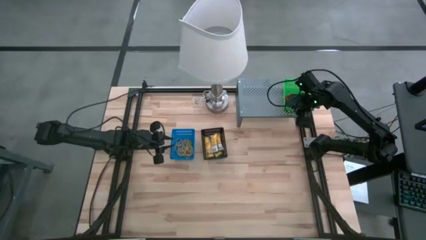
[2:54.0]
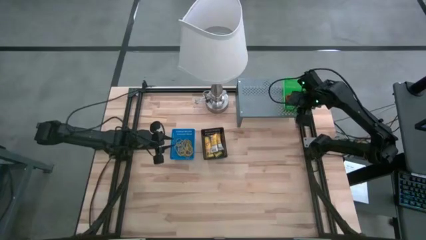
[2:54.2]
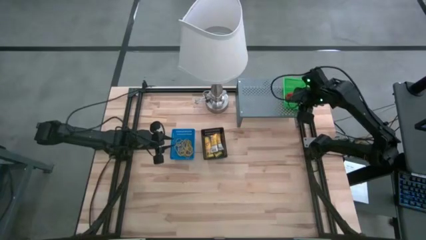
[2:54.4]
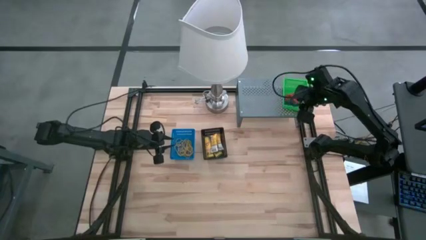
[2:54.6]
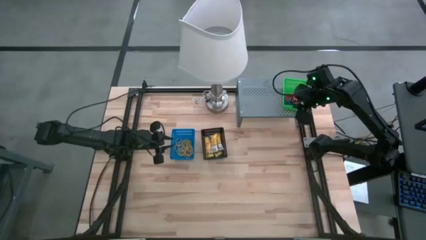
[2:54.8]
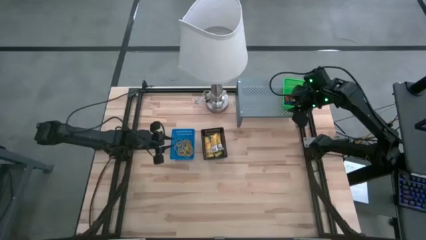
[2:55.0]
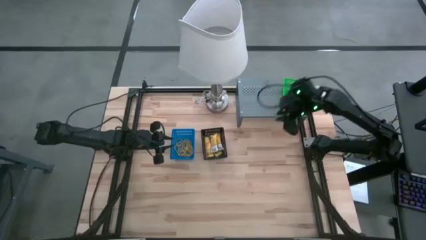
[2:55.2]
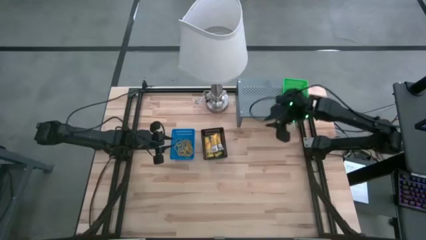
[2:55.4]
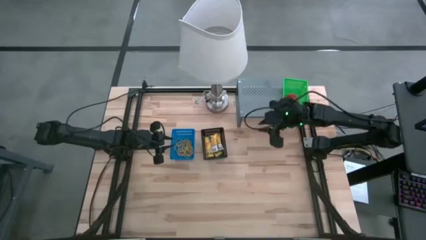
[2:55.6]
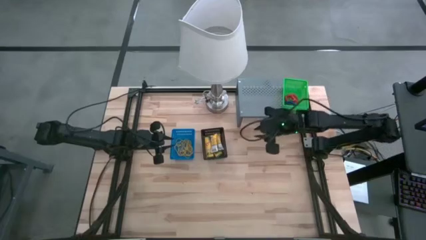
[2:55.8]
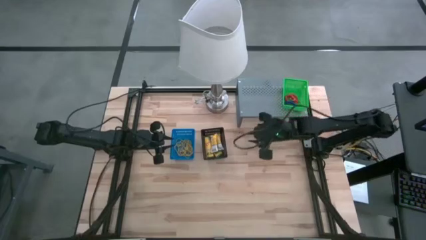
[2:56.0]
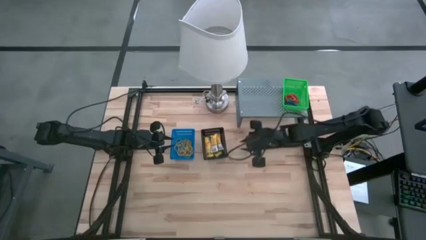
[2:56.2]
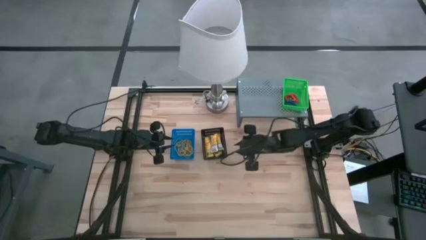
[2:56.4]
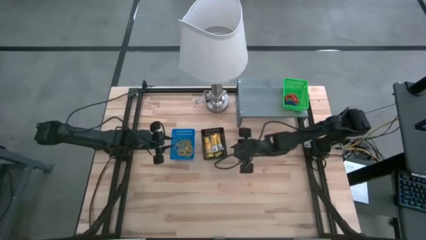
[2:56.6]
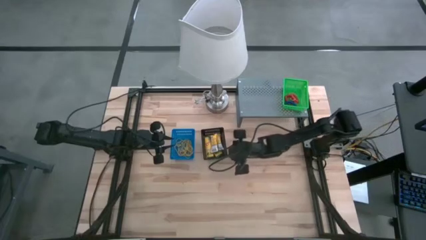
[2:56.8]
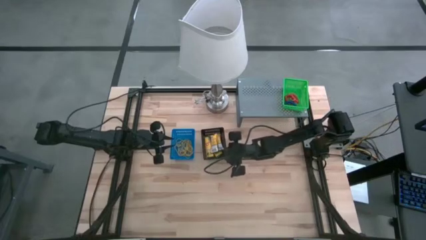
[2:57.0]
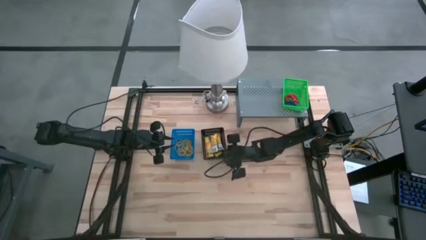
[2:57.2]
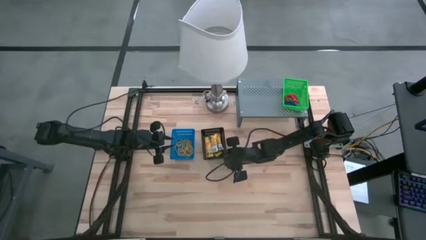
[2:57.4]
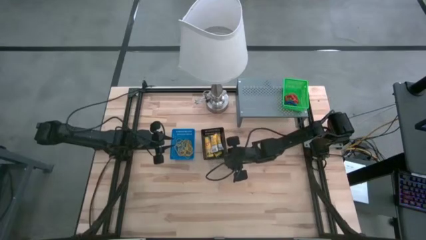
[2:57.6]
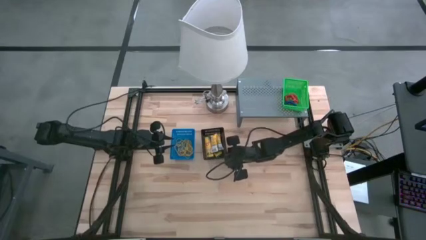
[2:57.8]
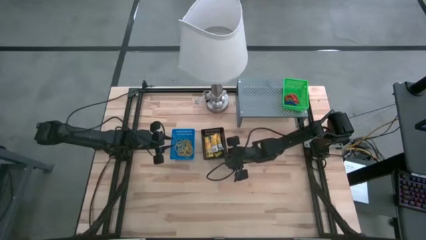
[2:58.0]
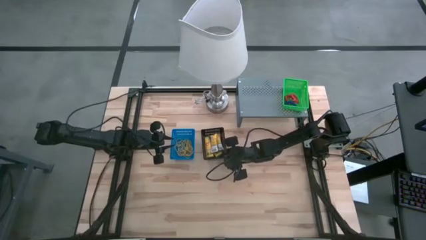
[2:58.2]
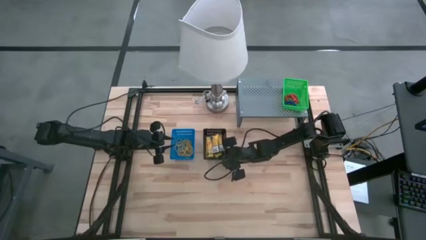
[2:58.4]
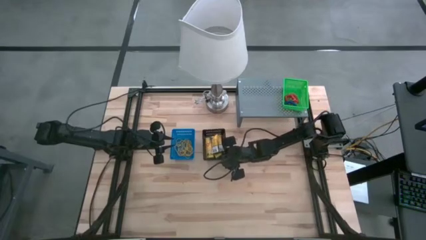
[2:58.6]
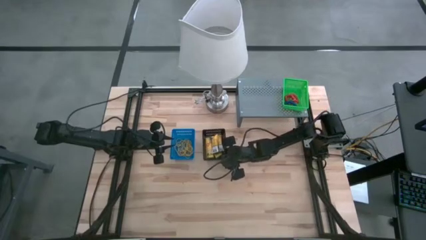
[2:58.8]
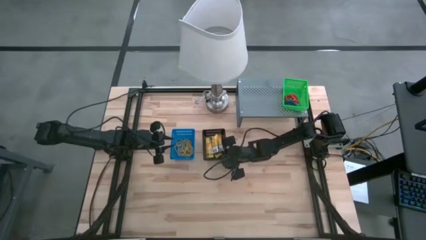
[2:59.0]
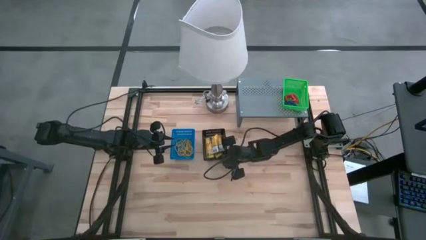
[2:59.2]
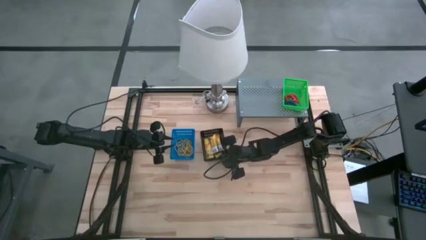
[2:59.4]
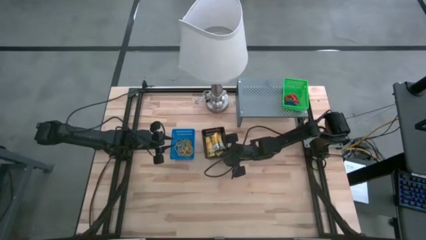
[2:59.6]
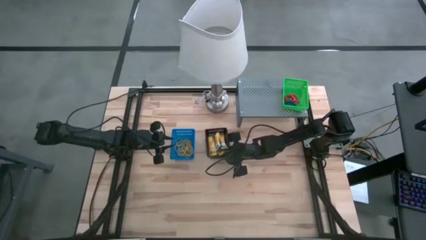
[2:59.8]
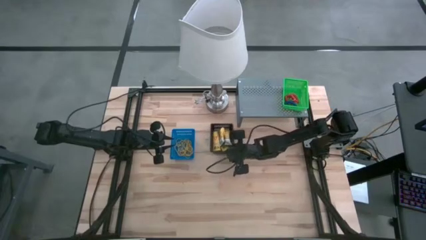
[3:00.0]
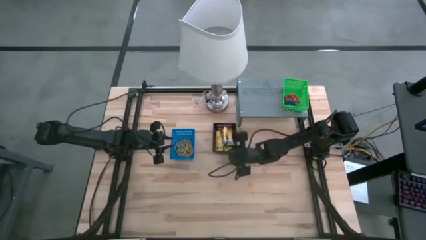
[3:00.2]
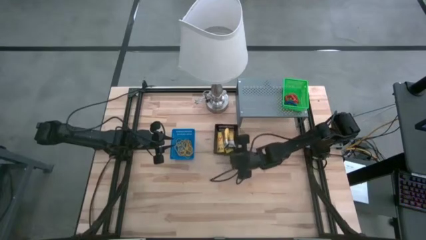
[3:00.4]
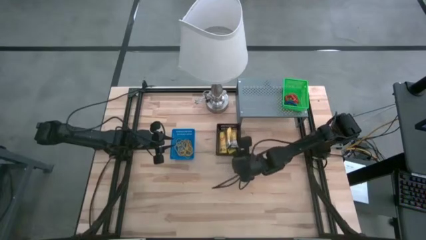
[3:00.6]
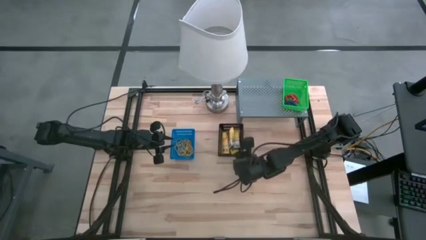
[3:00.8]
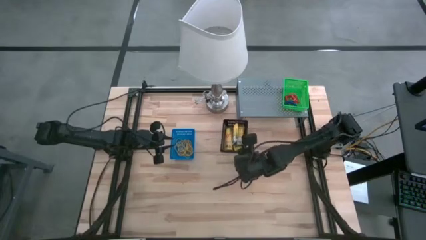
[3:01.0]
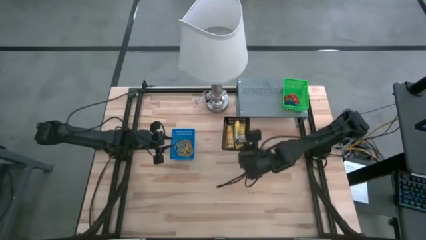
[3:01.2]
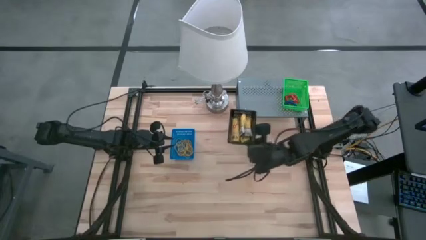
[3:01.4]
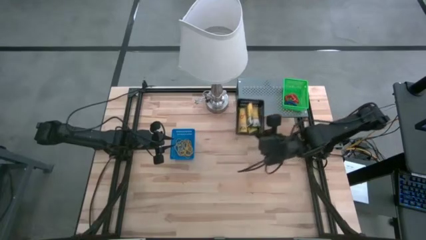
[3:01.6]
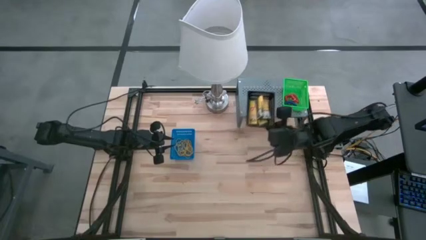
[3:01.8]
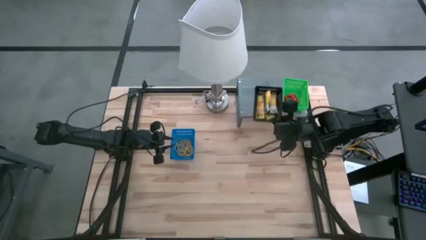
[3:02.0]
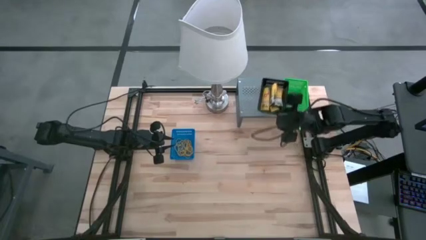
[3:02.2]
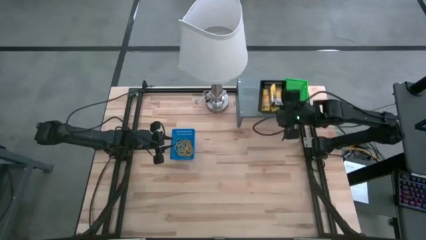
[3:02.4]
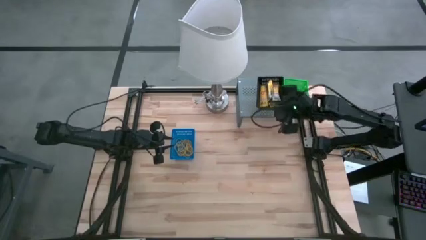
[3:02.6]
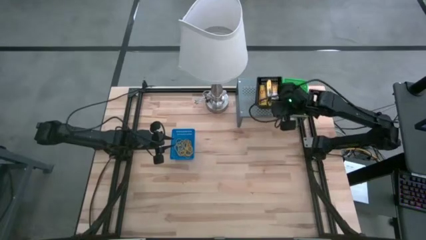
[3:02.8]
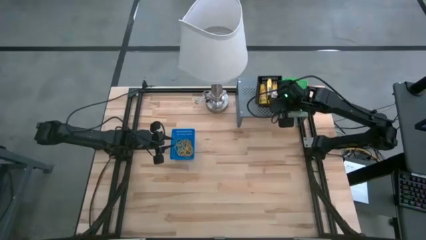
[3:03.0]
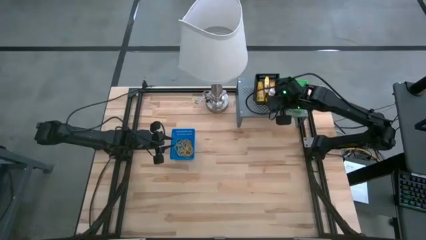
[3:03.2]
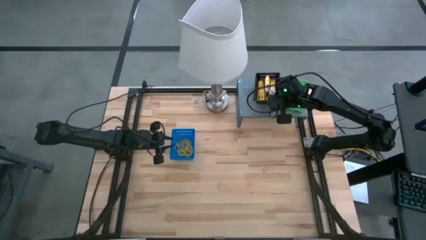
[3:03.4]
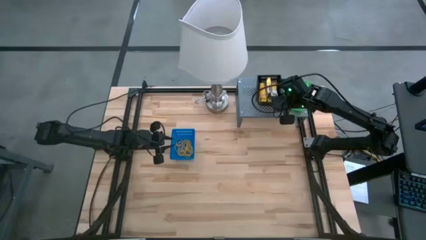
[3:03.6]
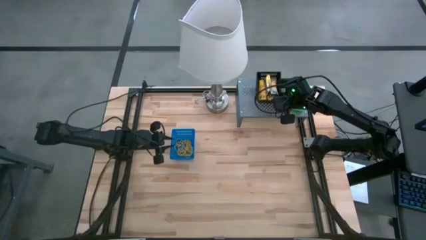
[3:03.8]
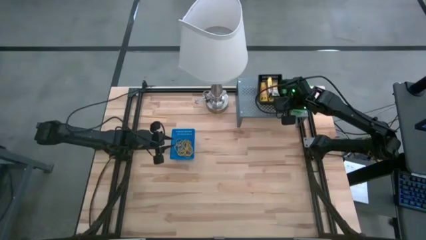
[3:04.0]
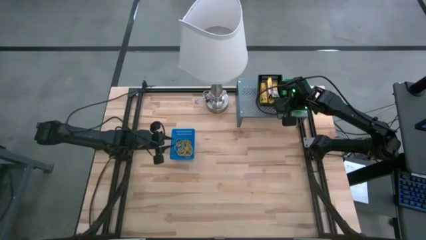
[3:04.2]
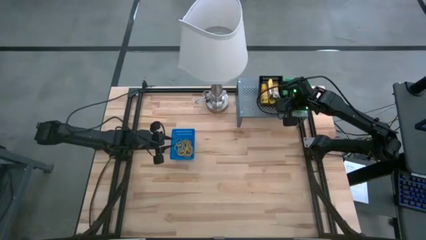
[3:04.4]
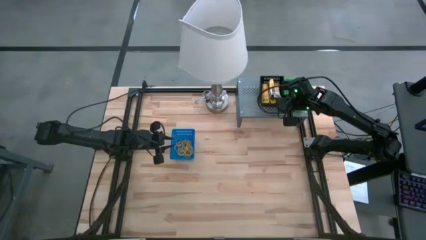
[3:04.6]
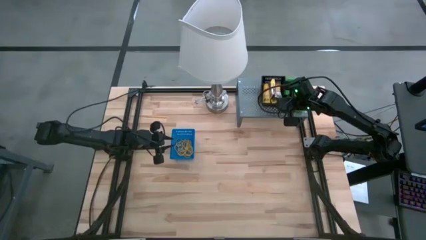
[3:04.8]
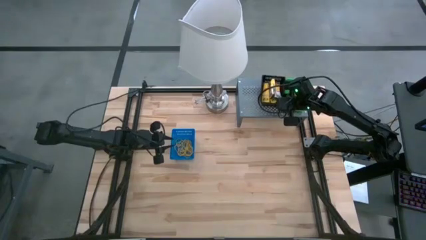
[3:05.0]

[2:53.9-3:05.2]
Task: Pick & Place Office Desk Supplies
Put the black bin on the shelf

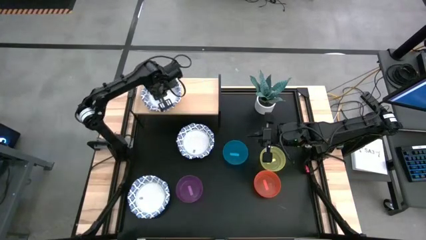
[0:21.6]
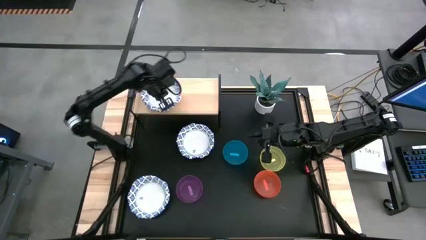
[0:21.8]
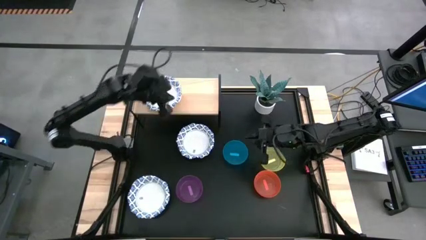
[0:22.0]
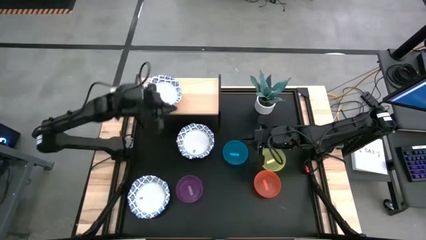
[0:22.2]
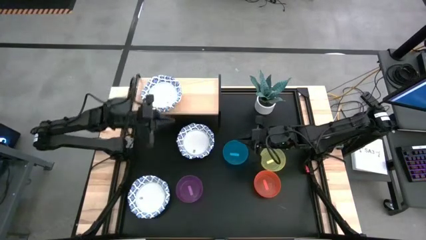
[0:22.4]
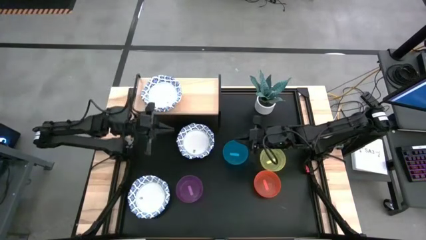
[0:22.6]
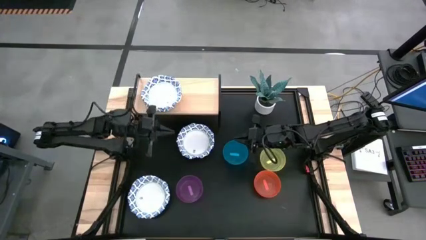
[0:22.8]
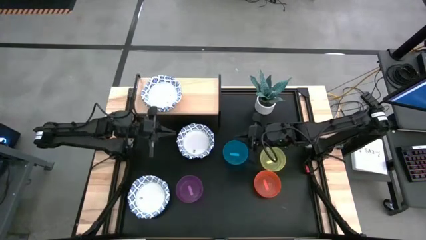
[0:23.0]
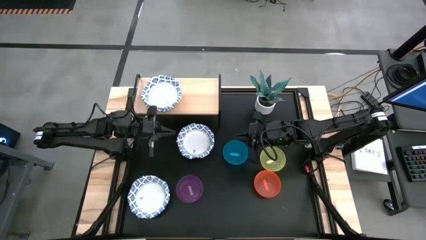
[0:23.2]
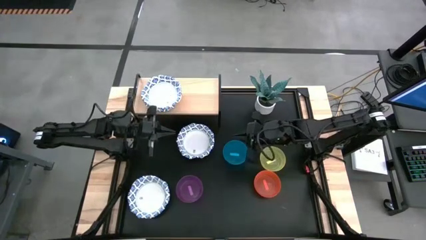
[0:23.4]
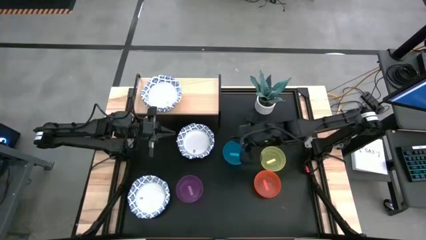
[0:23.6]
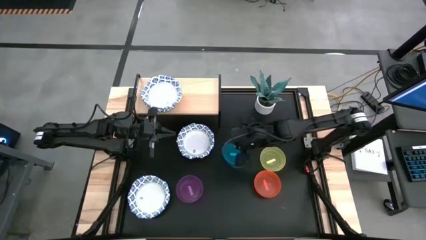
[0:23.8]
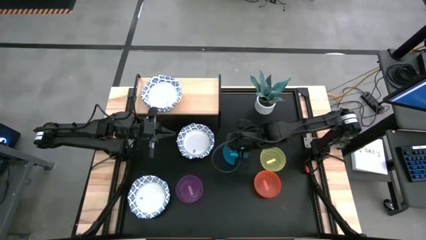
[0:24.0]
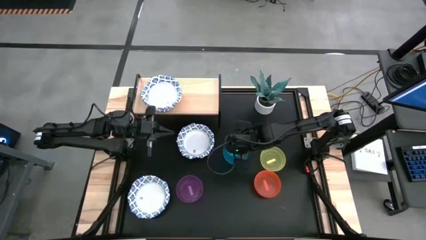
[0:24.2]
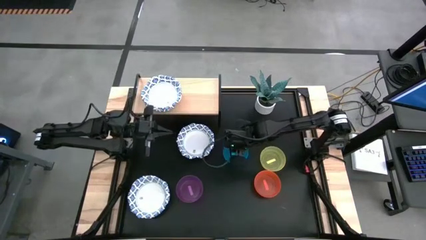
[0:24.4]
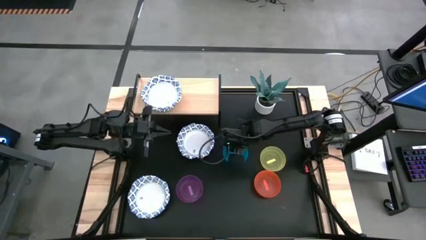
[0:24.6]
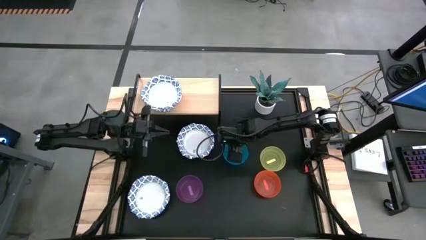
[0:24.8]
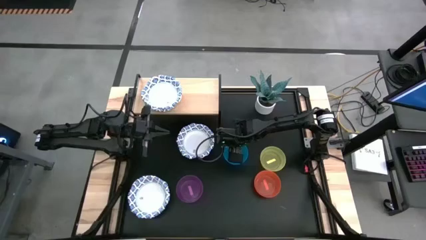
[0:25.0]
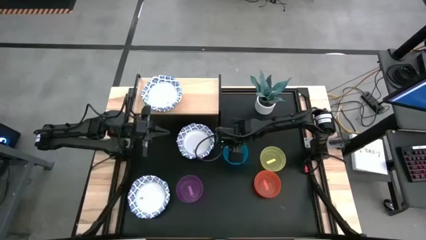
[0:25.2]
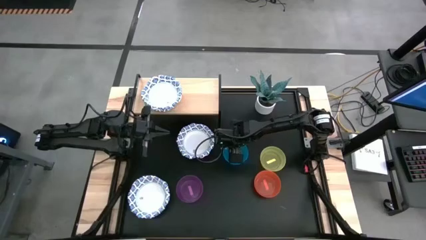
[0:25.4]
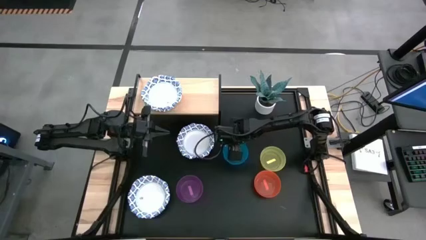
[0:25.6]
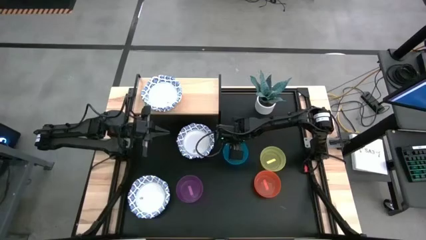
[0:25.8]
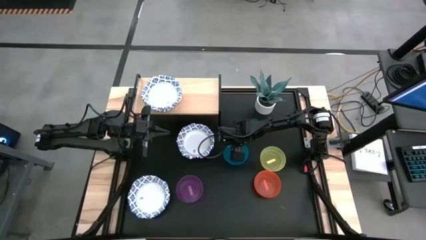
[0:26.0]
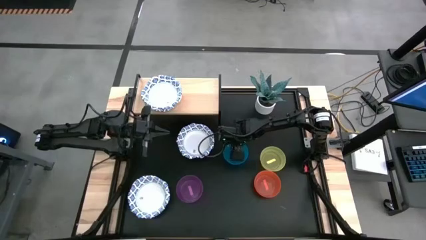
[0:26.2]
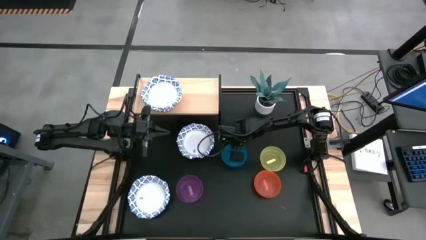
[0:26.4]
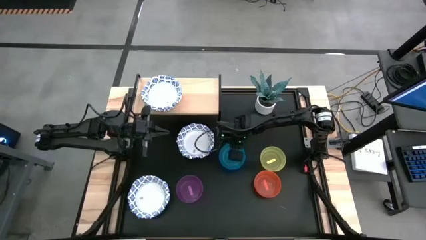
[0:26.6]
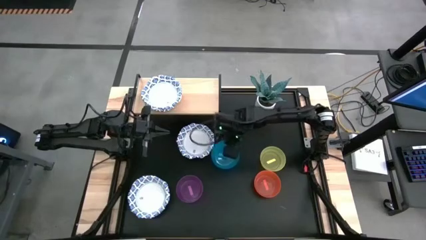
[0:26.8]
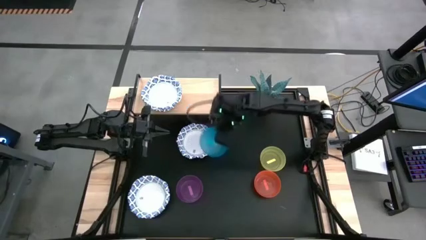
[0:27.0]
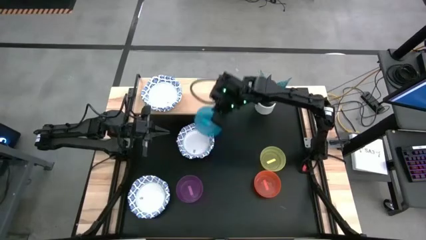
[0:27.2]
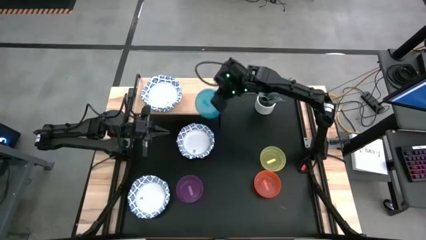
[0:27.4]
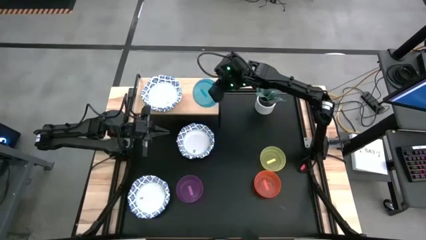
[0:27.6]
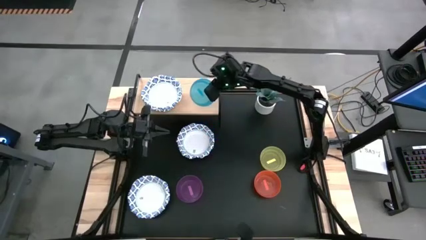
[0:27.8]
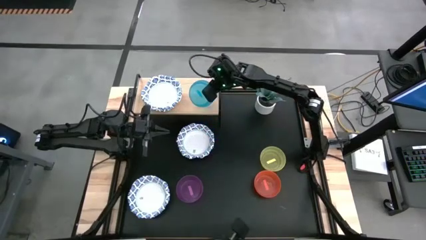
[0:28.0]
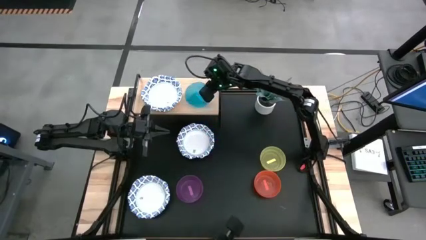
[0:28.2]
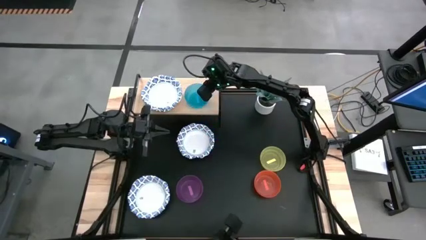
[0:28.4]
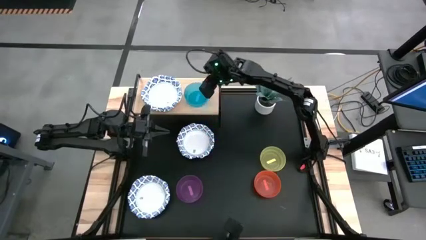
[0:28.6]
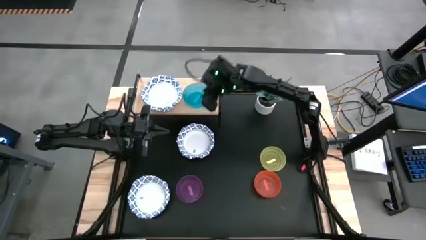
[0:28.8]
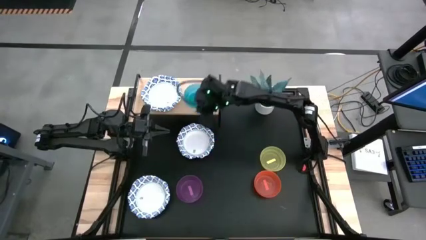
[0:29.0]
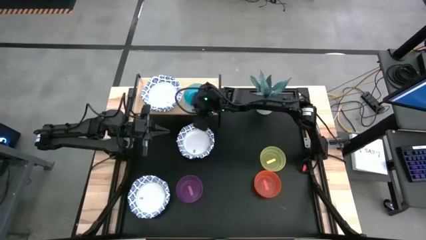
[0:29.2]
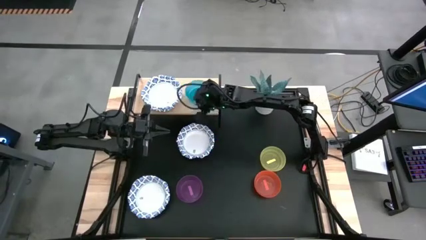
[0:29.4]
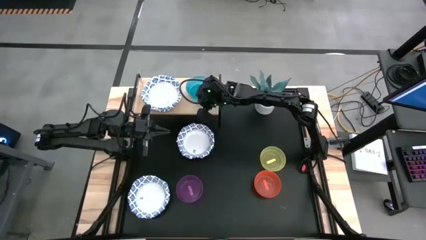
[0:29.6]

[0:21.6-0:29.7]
Task: Place and stack bowls onto a shelf
Put the small blue bowl on the shelf
